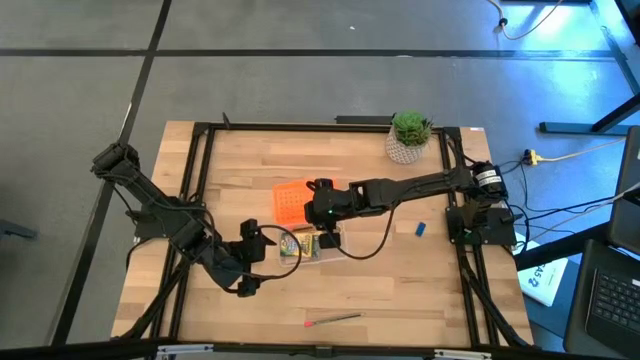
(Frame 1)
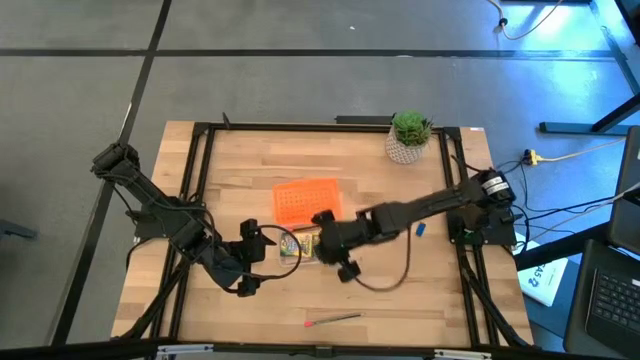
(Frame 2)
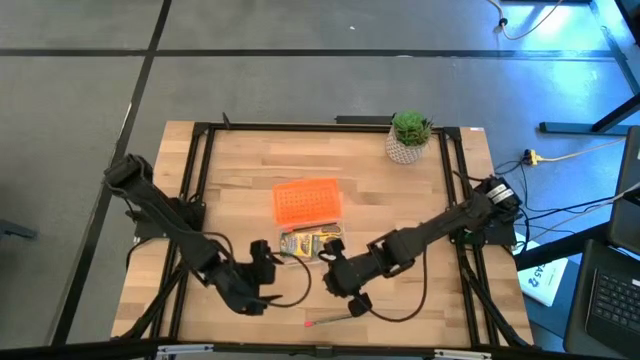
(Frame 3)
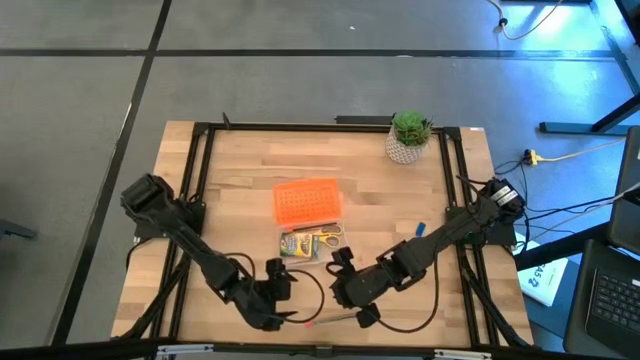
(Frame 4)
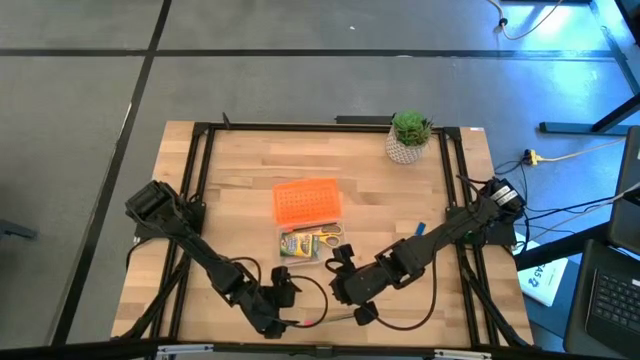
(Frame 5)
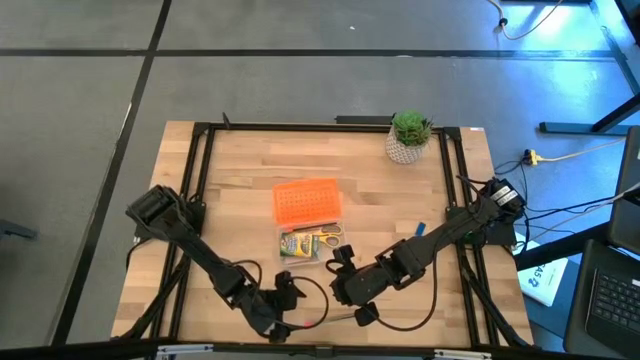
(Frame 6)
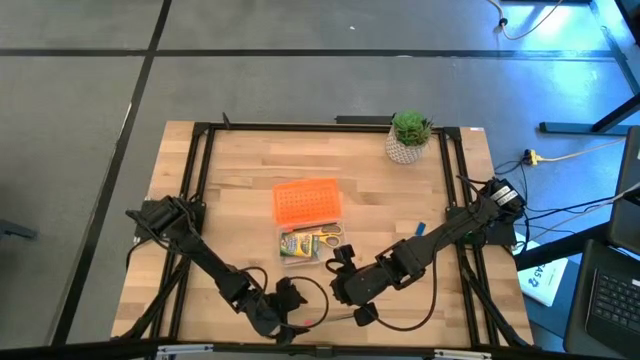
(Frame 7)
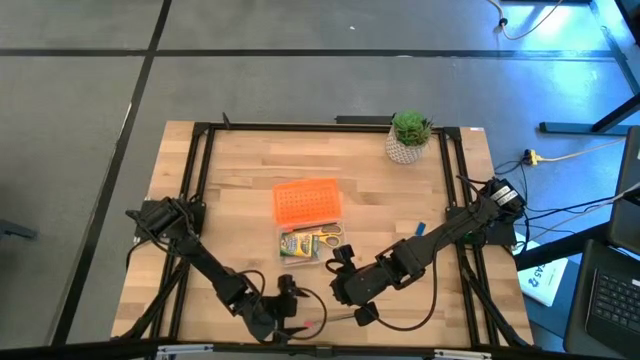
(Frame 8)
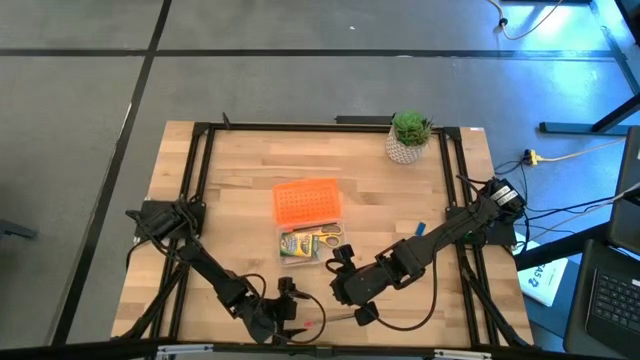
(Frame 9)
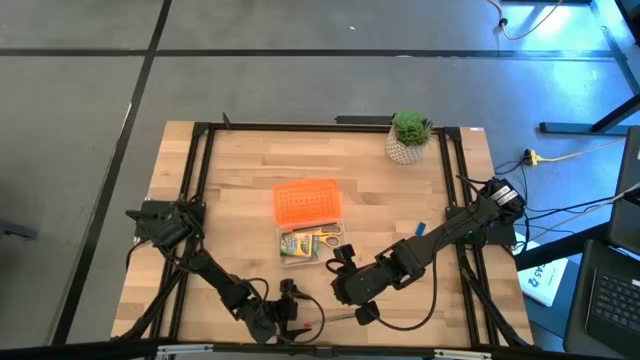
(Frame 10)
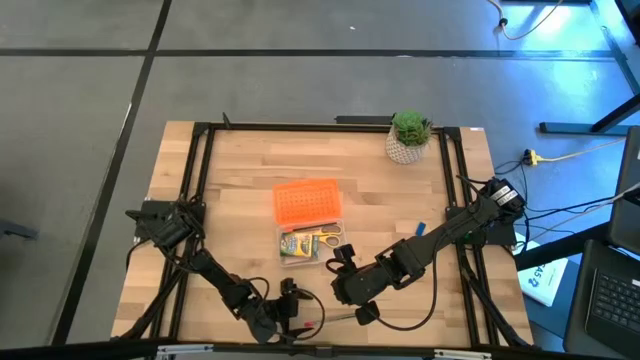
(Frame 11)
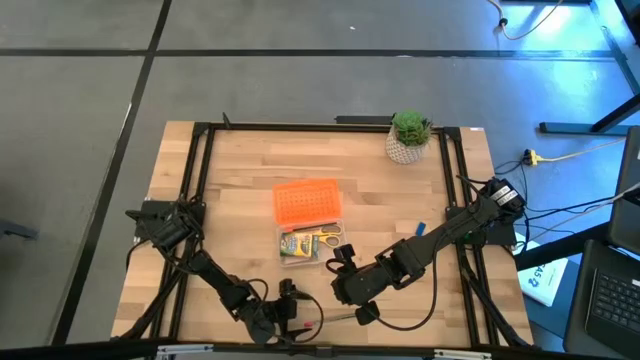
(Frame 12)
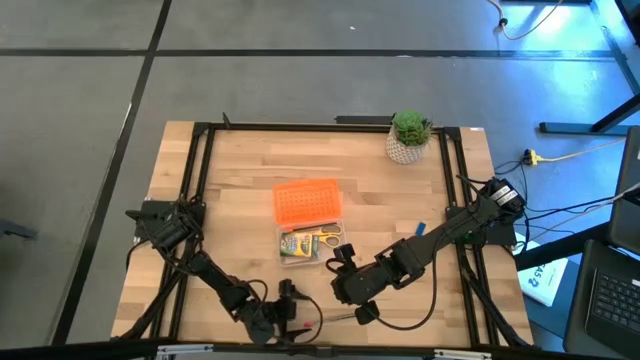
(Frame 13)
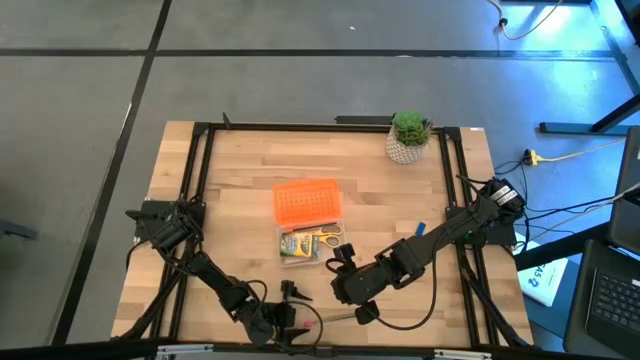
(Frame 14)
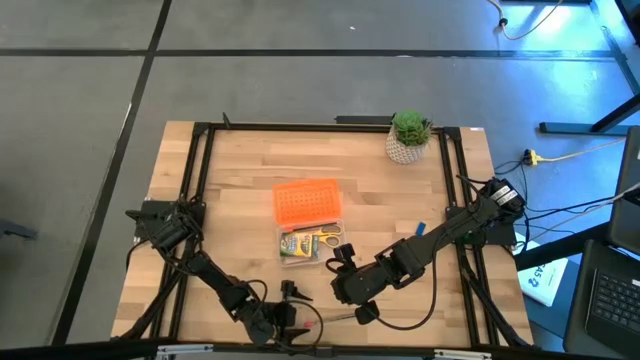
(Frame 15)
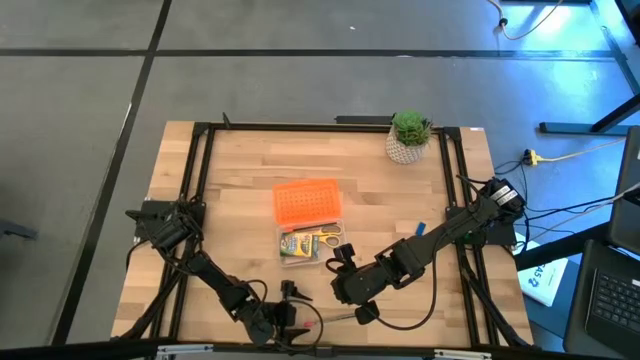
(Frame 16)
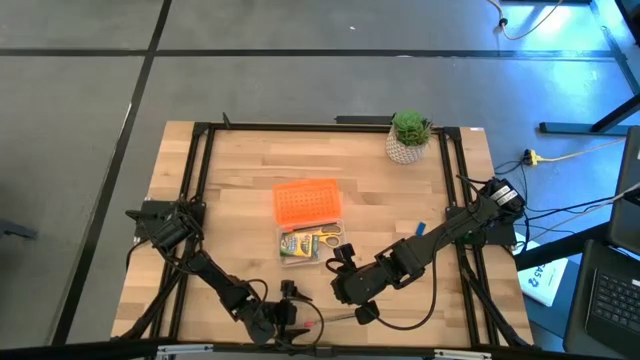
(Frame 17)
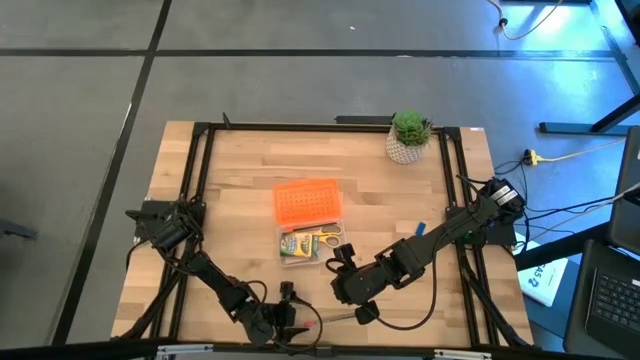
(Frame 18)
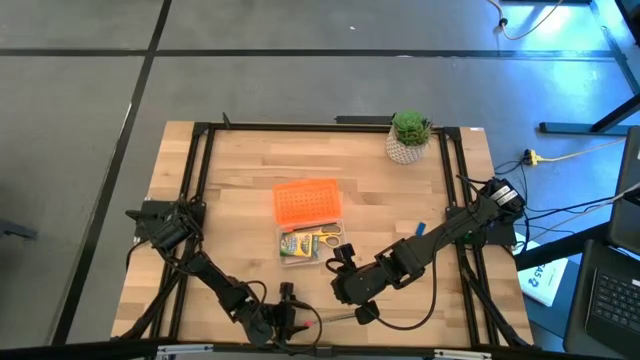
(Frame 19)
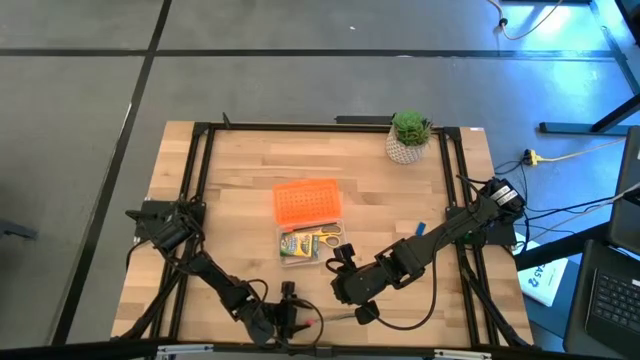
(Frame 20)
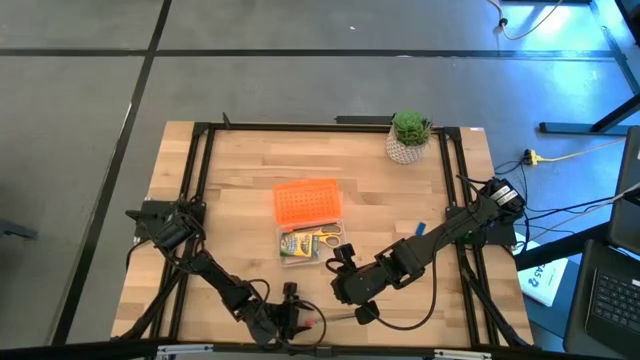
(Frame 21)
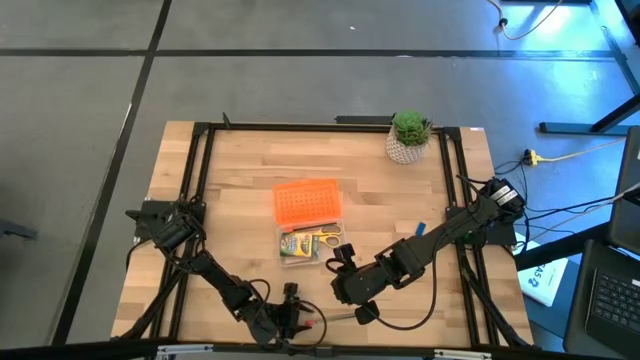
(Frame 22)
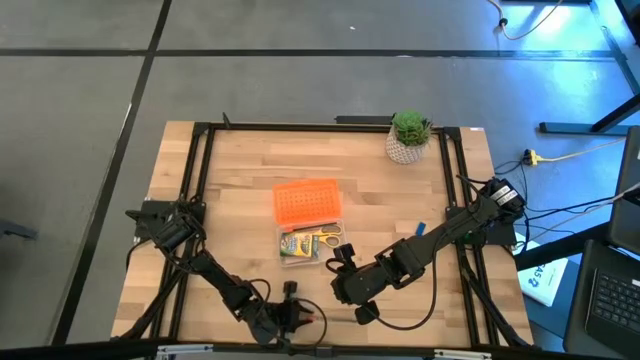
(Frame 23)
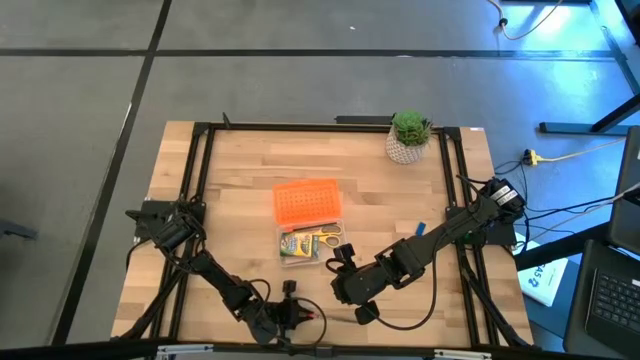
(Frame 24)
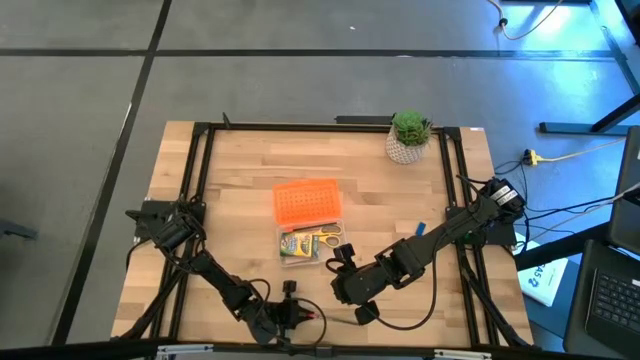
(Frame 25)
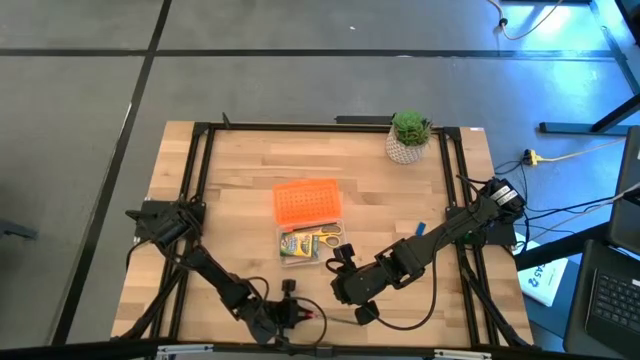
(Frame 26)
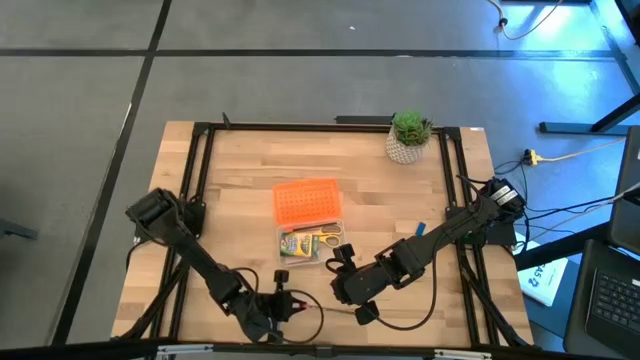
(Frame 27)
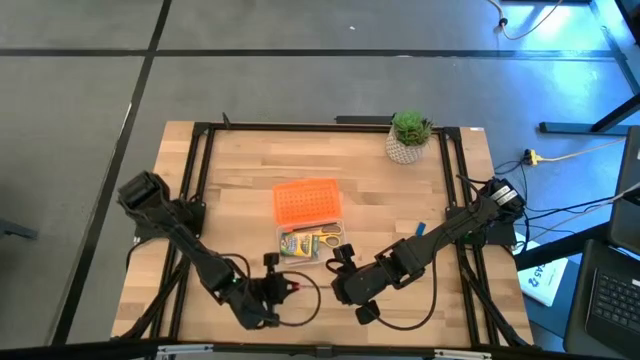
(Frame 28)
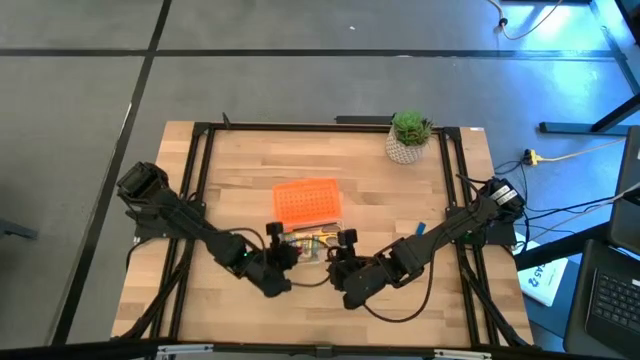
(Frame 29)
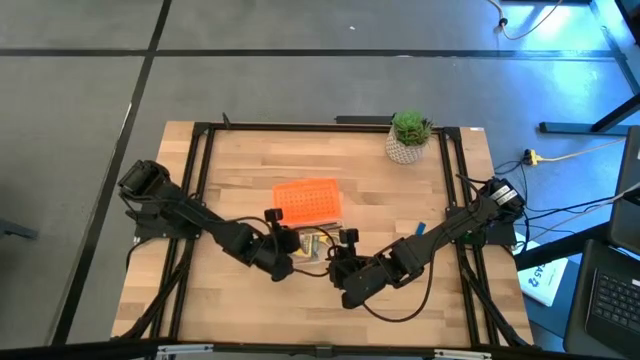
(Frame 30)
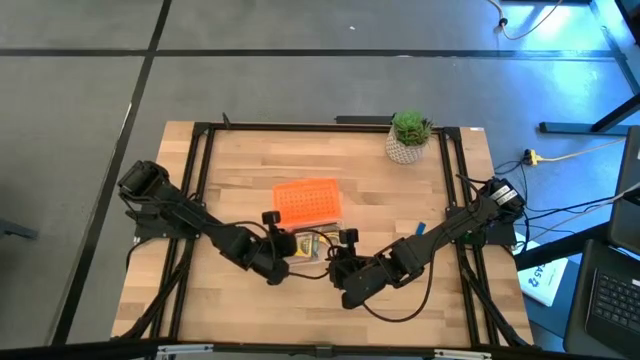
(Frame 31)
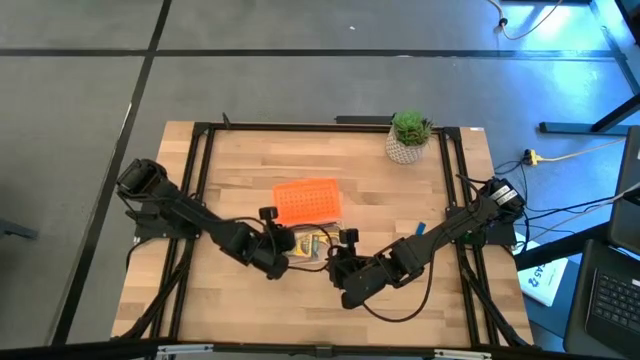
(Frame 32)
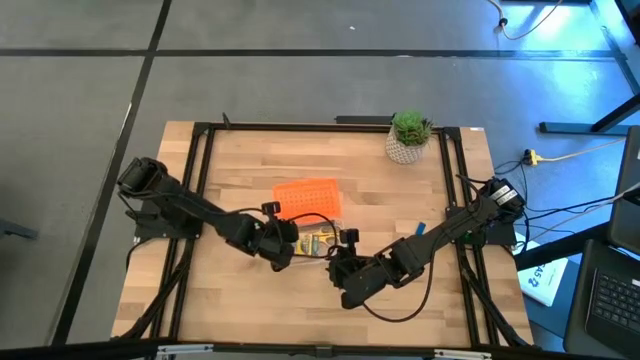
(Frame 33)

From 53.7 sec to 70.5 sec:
Task: Pack school essentials
Put the black pencil into the supply box

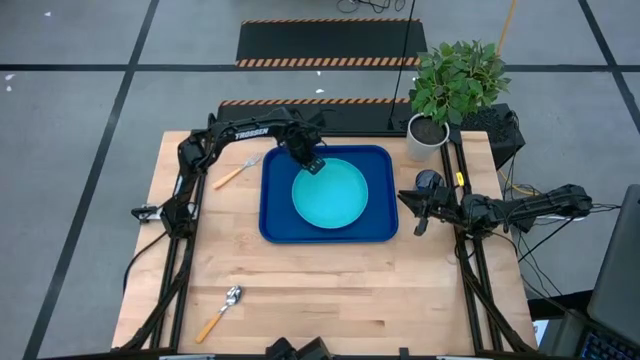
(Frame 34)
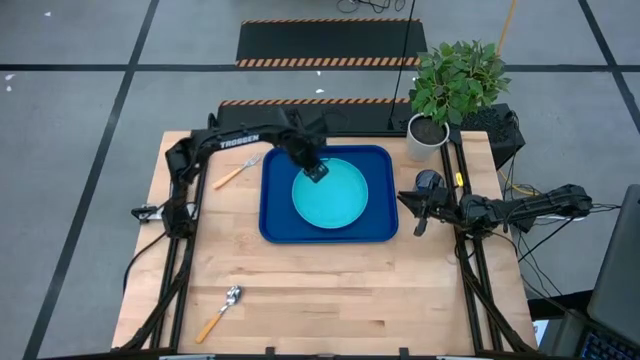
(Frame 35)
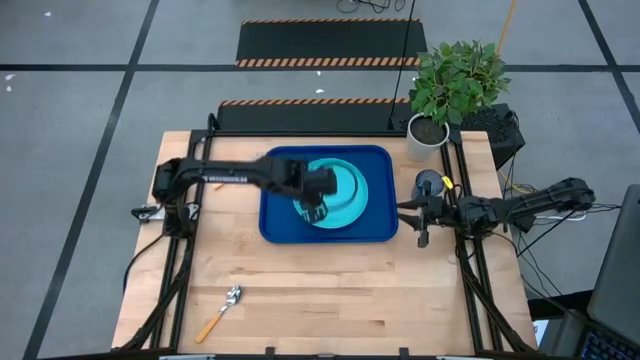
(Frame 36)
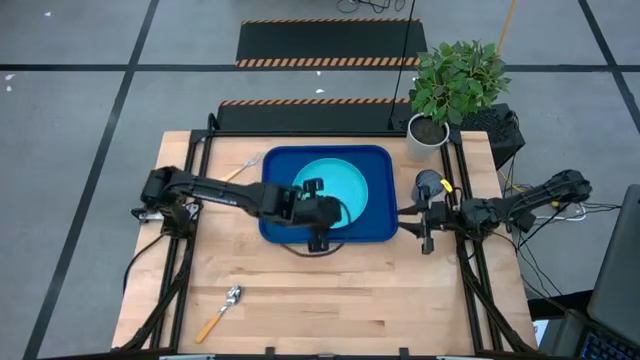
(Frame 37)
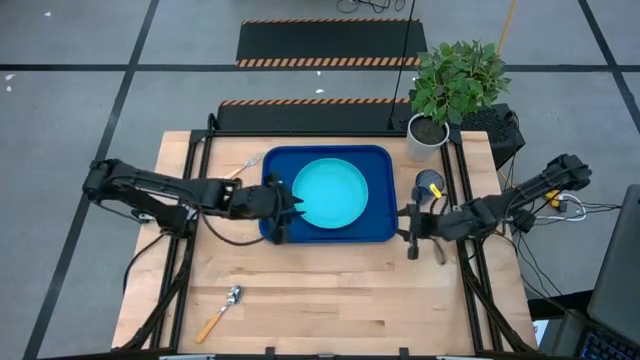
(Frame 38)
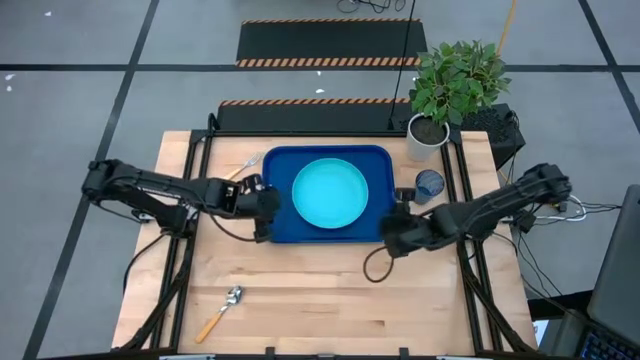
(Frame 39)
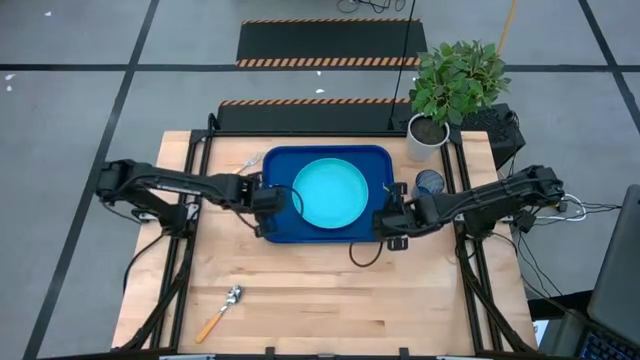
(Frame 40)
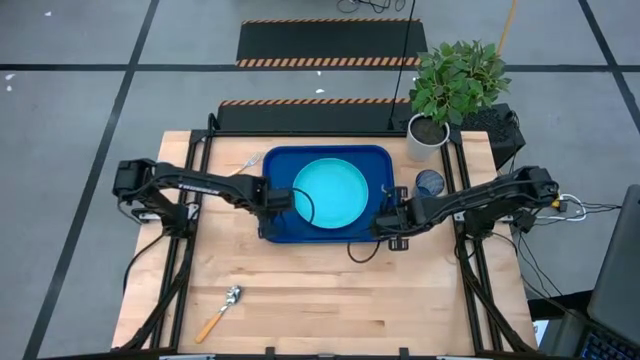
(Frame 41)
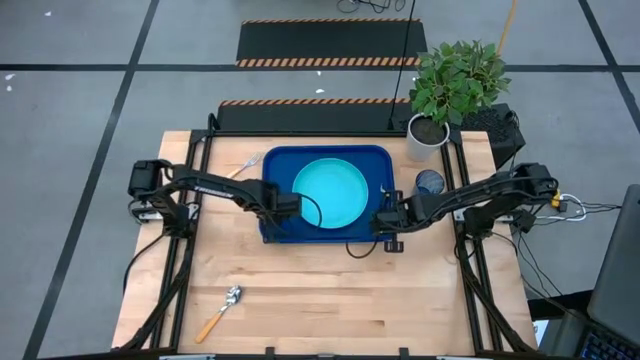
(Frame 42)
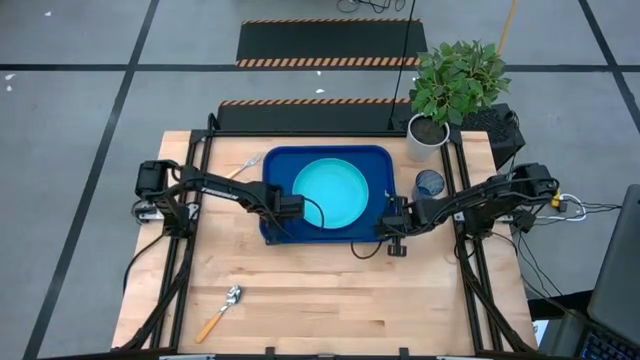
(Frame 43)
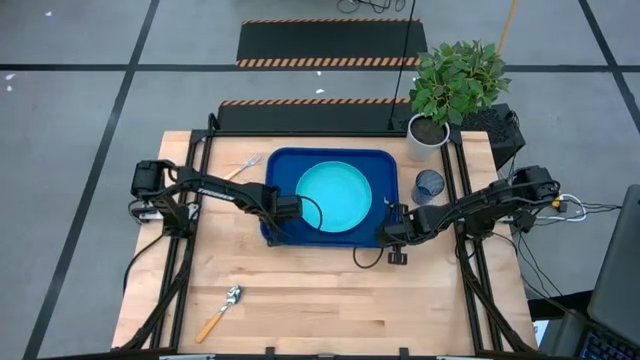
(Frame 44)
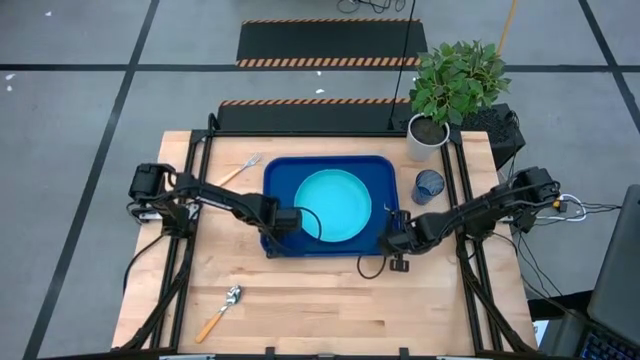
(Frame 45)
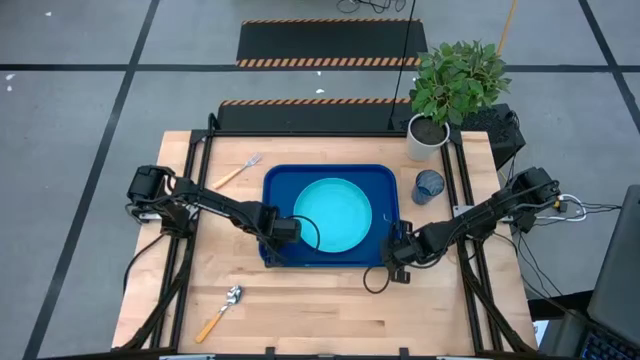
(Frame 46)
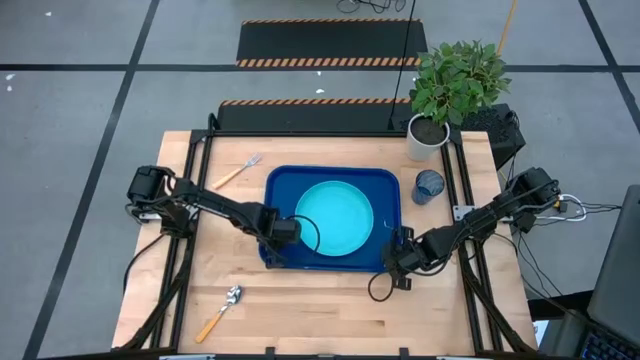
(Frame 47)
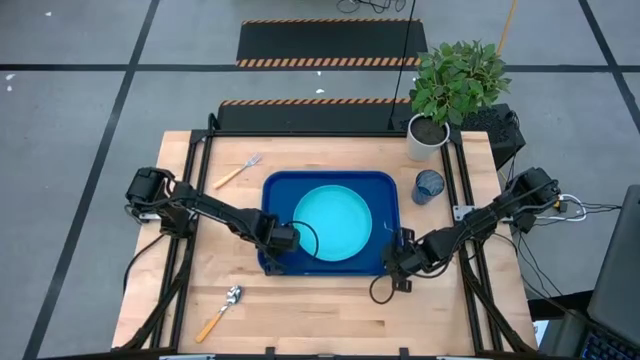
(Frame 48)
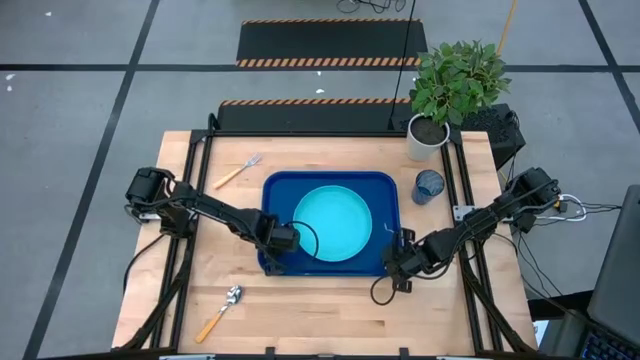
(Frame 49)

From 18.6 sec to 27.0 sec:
Task: Pick and place plate/cup/fork/spoon on tray
Move the blue tray to the center of the table
